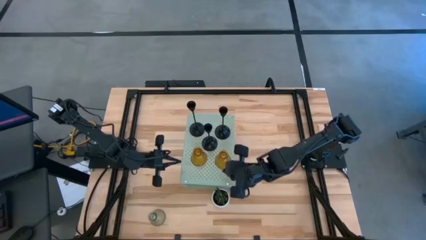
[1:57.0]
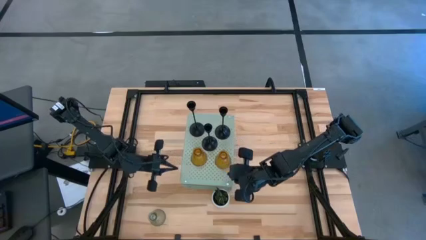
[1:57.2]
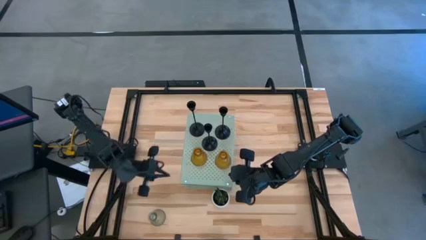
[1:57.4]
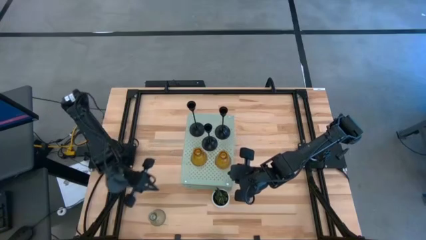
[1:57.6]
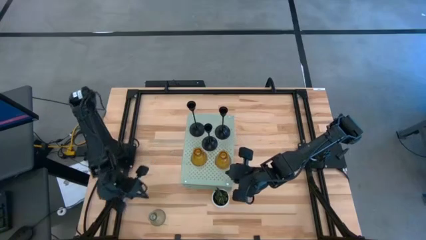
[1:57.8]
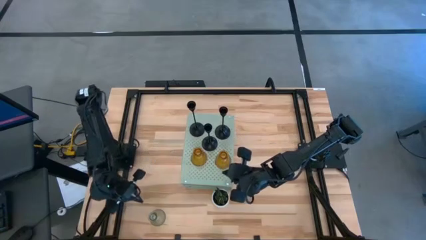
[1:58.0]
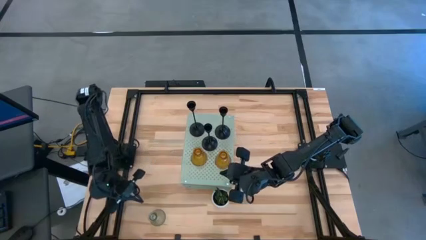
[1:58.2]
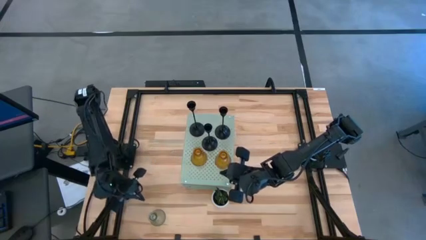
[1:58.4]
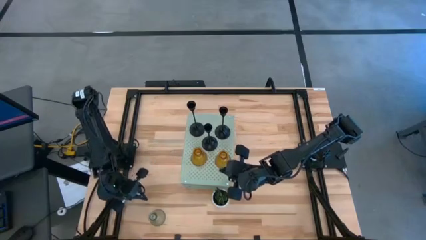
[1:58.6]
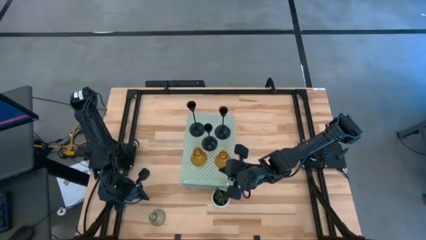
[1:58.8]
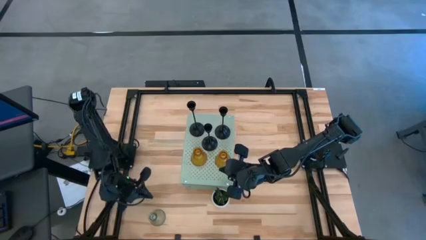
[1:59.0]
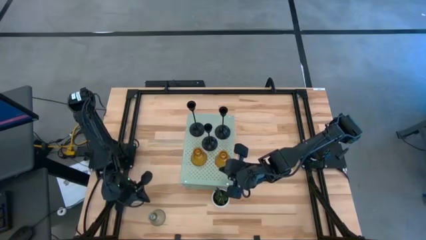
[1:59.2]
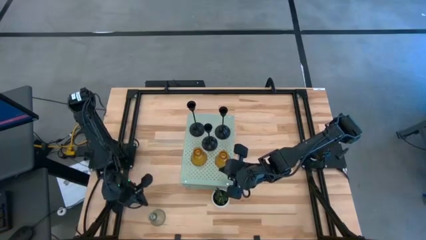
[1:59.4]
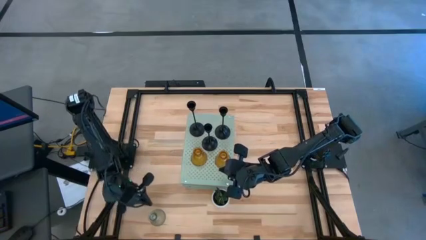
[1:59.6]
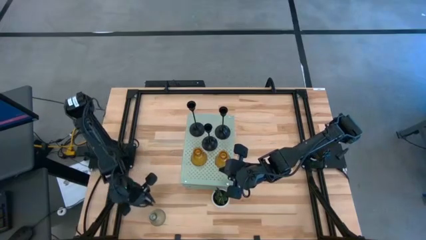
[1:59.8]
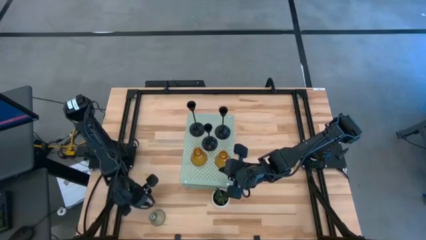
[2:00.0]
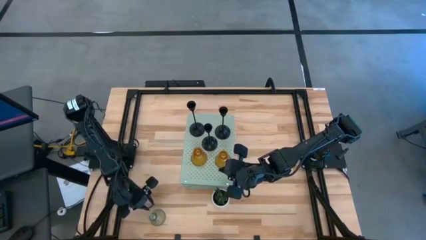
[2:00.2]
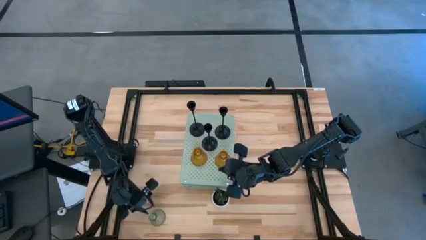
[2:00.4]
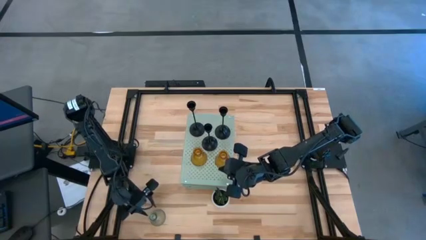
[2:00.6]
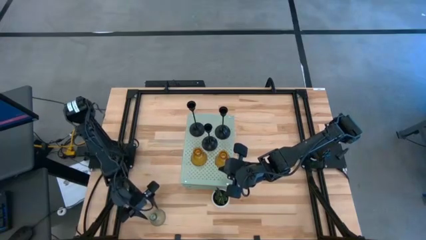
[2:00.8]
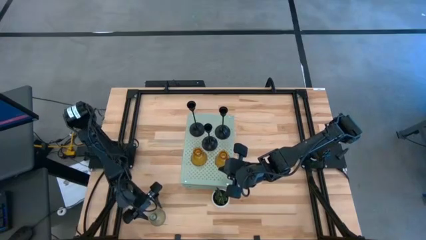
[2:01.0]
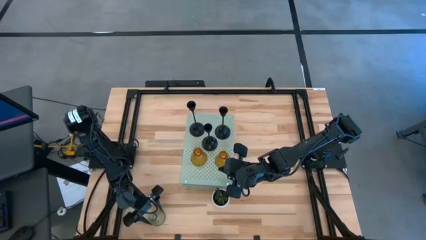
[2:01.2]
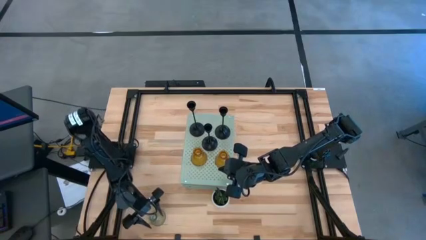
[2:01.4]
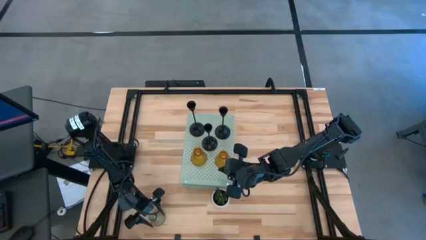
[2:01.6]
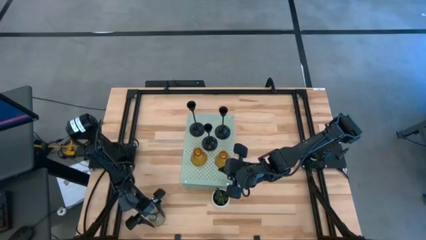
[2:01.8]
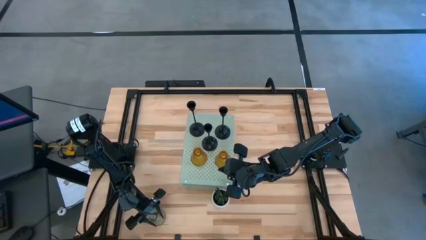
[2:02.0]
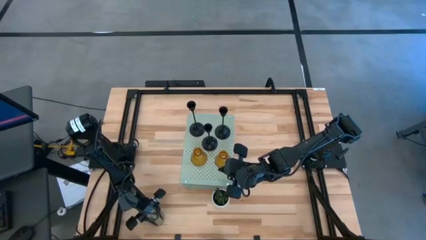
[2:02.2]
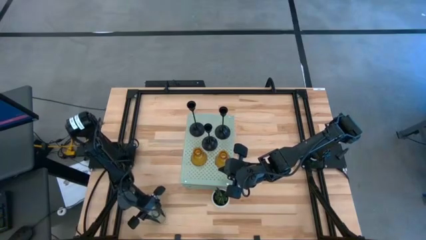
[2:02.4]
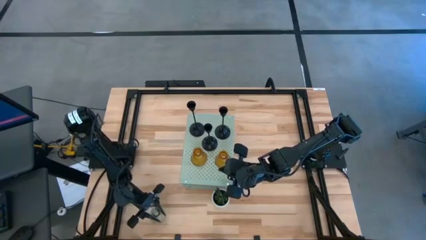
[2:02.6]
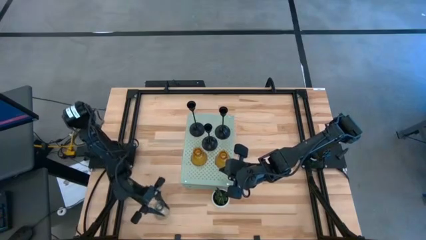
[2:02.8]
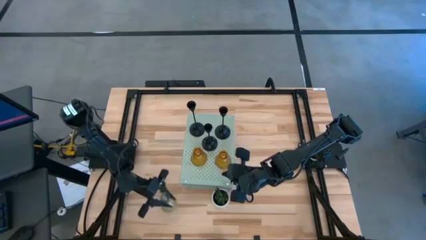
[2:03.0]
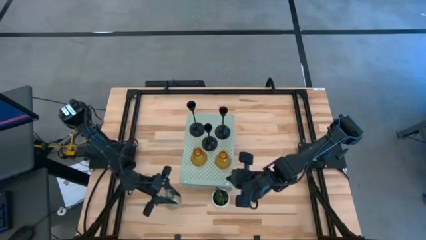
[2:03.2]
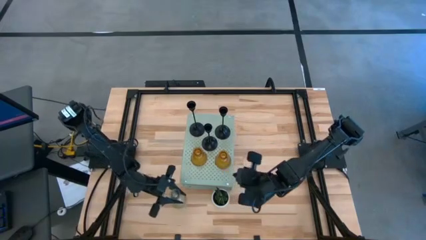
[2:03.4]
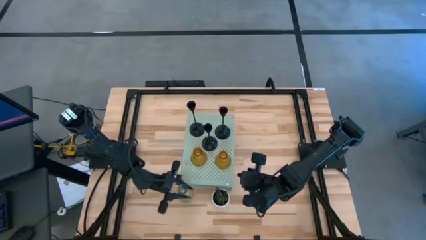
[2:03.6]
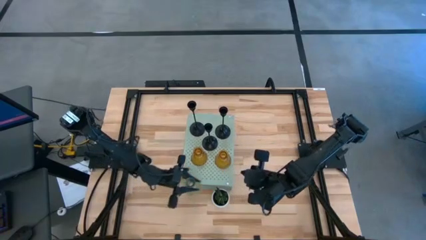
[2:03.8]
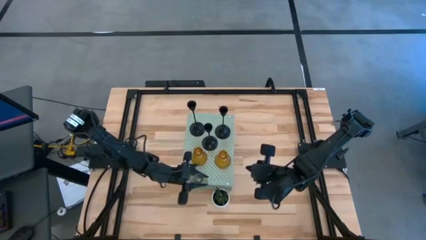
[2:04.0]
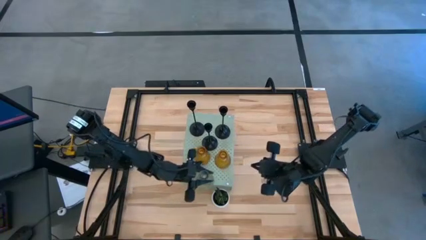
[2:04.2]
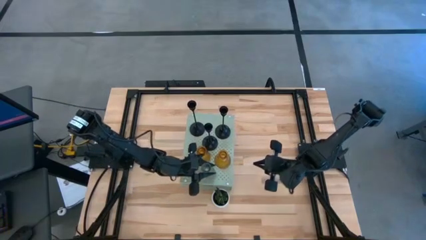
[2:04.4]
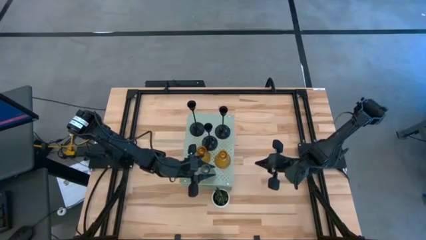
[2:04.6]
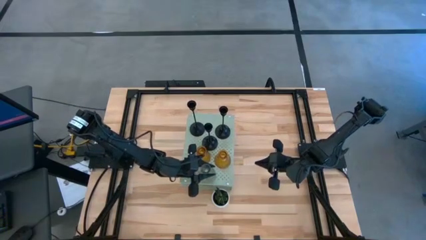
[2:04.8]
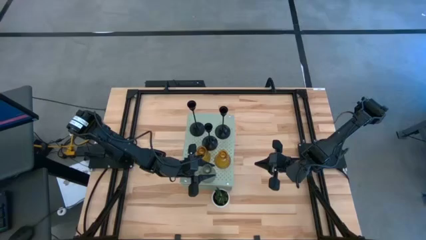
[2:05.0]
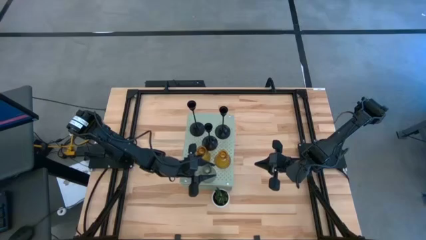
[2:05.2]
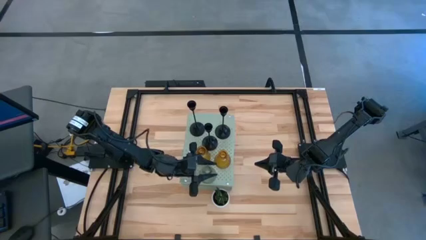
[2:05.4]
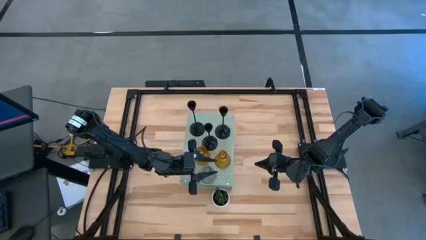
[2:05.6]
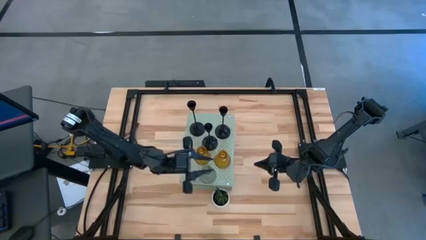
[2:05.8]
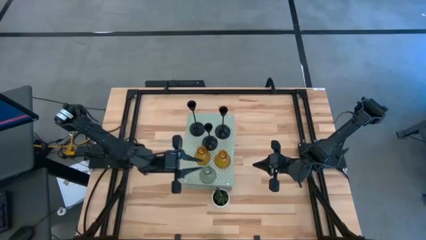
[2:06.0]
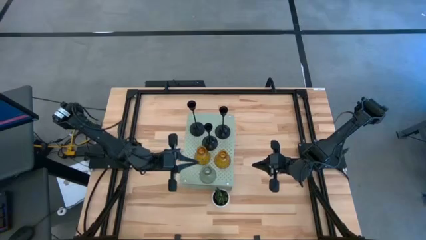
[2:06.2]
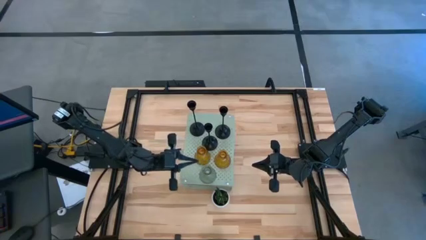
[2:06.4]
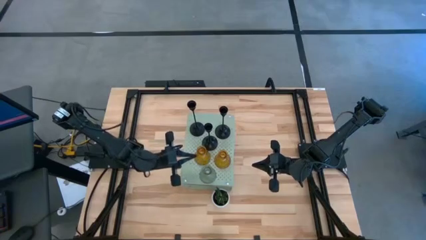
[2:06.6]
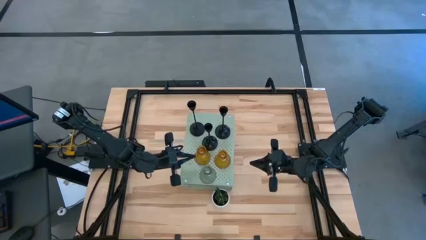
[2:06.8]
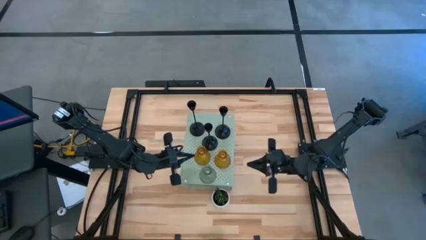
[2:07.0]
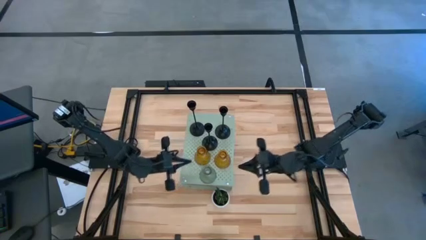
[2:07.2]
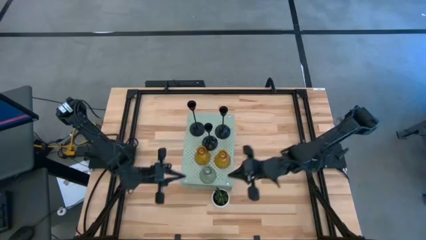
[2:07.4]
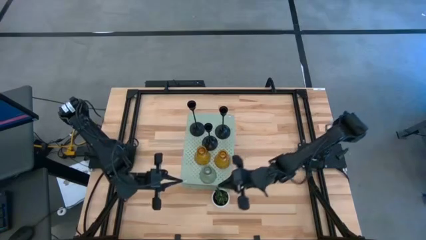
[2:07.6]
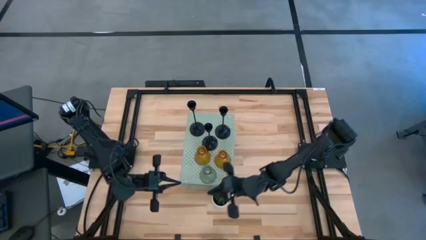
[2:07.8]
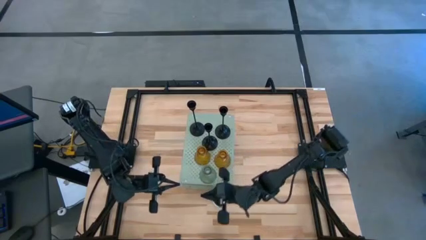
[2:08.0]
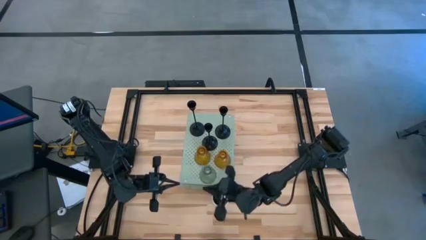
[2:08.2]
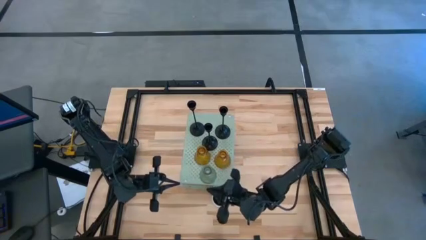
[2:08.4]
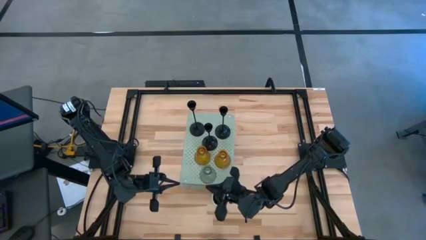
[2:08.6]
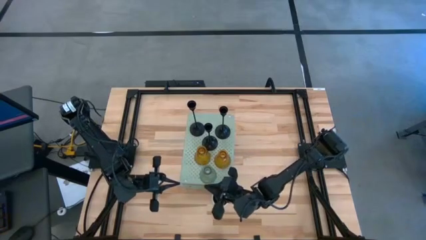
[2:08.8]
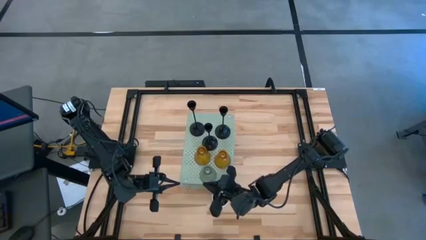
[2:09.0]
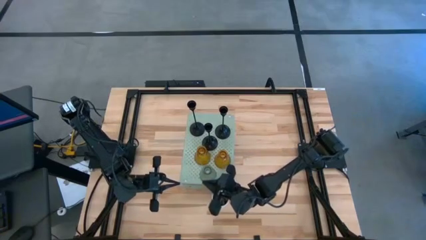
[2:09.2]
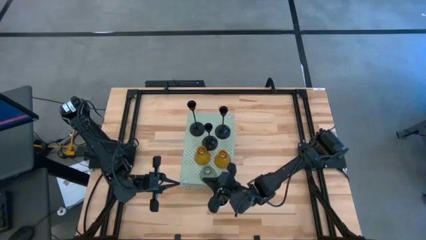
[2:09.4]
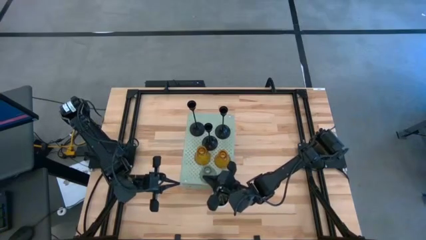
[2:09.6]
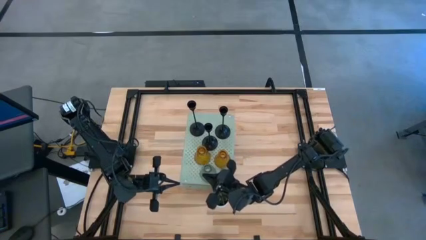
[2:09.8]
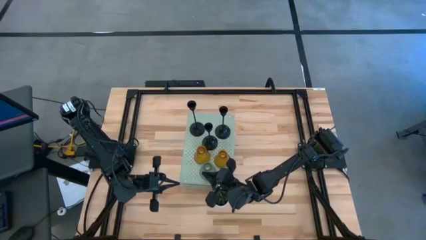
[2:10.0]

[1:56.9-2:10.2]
Task: Pick & Place candle stick holders
Put the transparent candle holder on the shelf

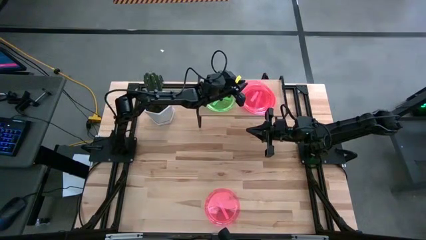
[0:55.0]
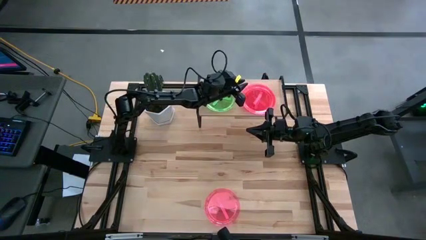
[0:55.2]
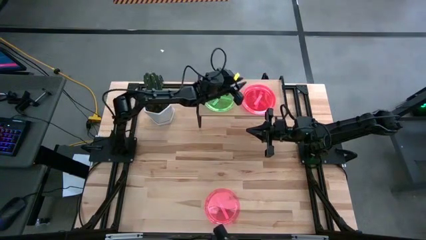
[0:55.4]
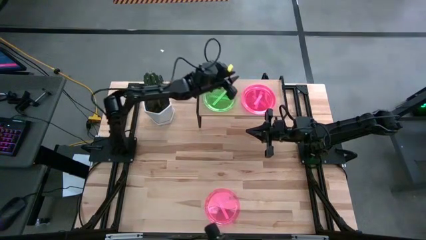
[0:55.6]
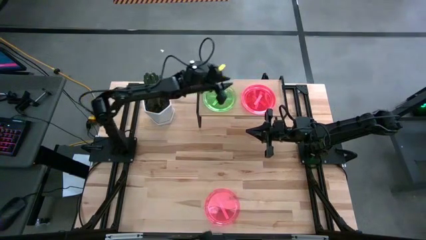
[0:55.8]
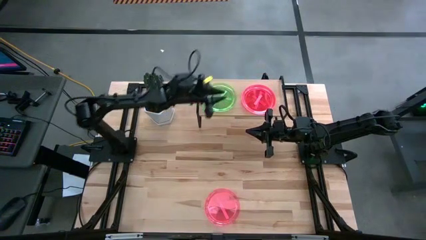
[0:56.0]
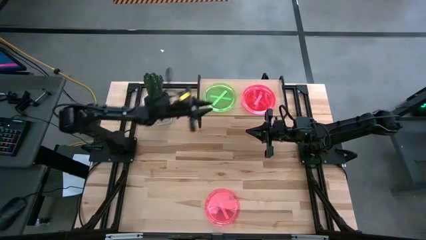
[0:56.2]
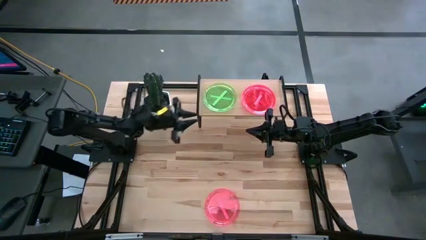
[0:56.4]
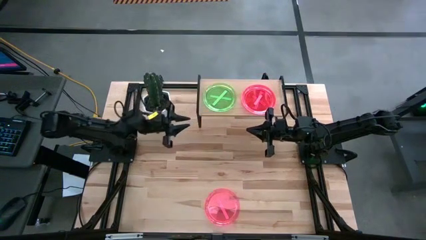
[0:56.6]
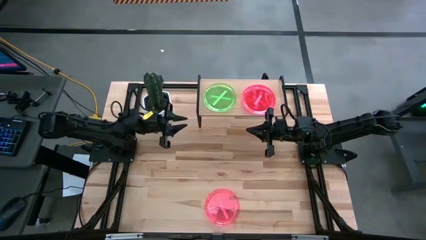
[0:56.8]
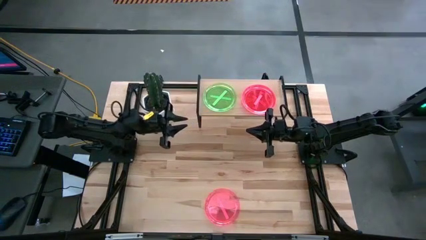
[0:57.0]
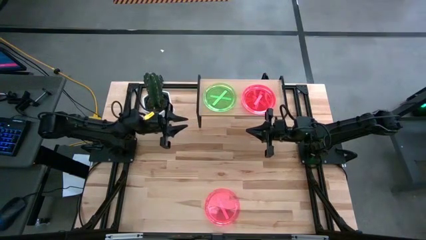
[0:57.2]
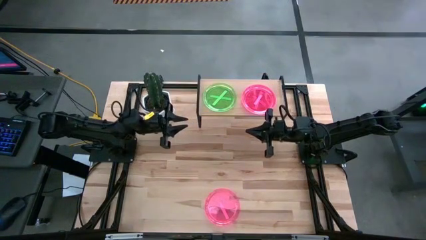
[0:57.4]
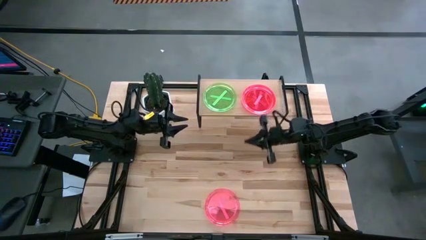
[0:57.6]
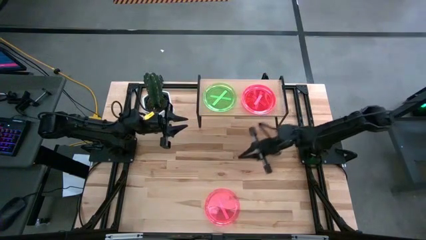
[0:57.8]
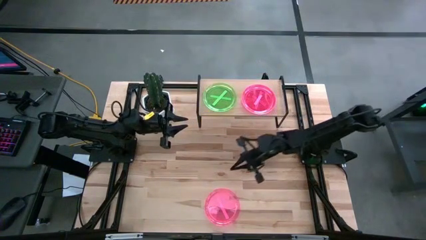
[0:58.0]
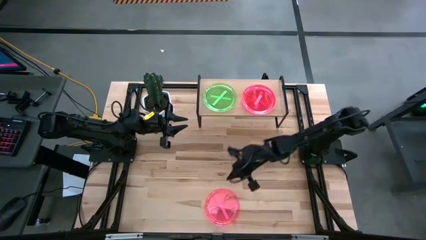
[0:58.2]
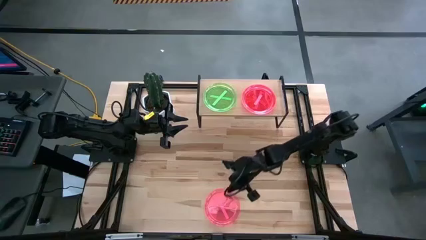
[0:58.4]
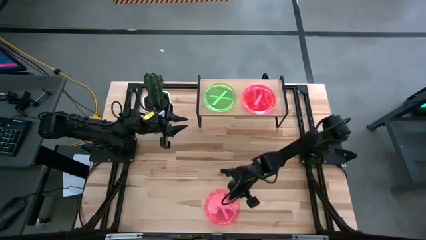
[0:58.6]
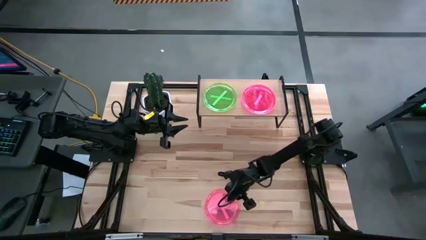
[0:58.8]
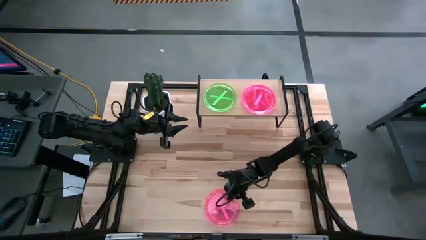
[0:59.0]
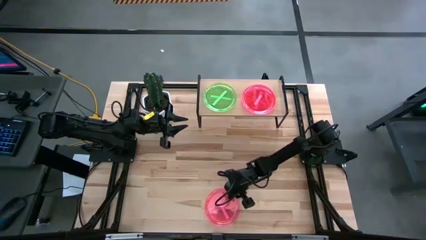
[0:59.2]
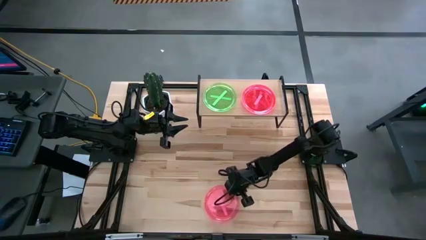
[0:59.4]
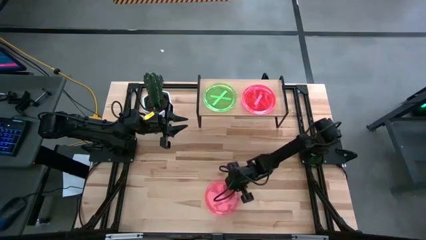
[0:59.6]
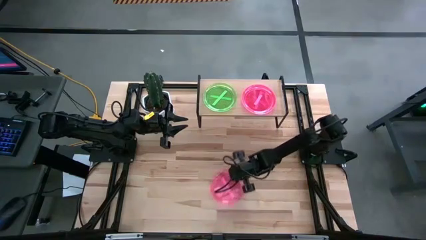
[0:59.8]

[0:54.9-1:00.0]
Task: Place and stack plates onto a shelf
Stack the pink plate on top of the pink plate on the shelf
